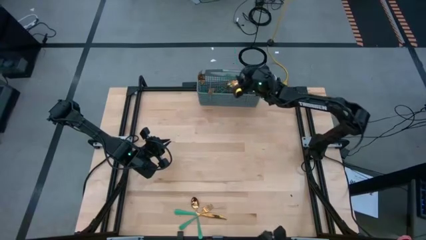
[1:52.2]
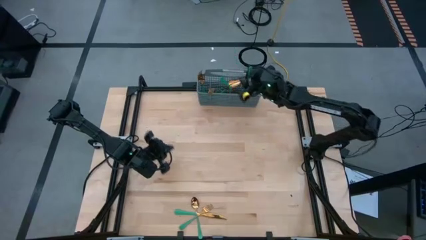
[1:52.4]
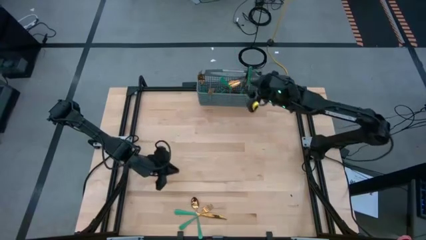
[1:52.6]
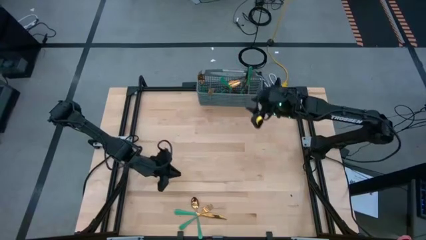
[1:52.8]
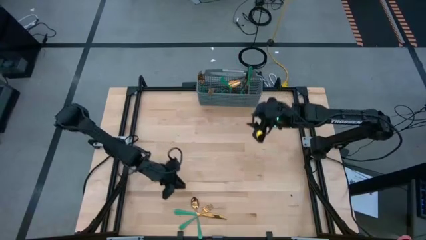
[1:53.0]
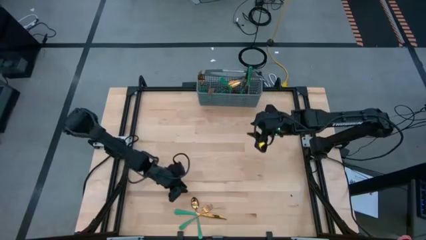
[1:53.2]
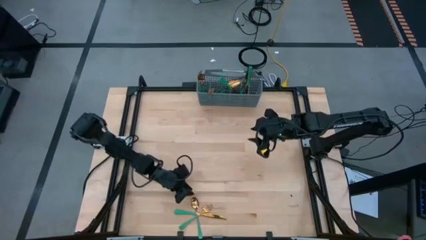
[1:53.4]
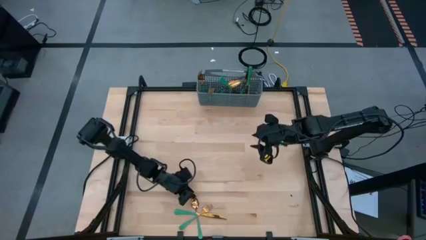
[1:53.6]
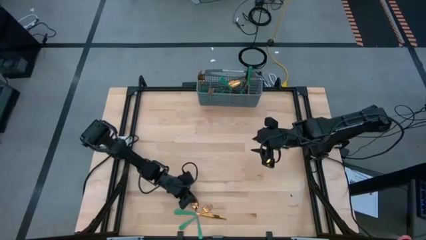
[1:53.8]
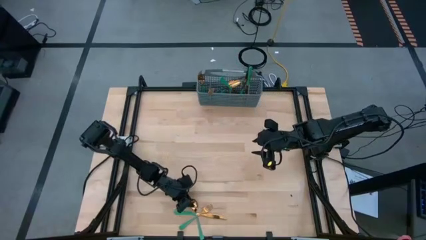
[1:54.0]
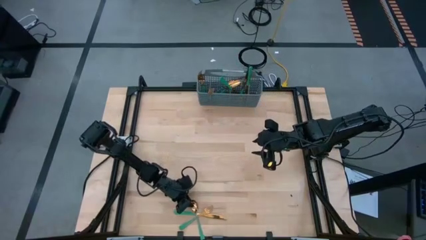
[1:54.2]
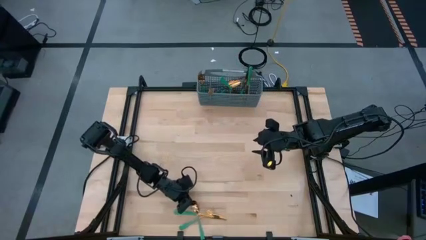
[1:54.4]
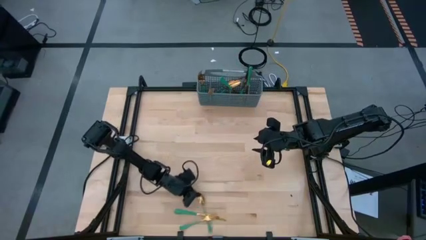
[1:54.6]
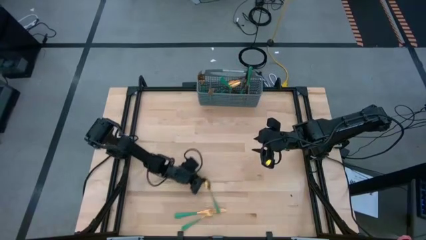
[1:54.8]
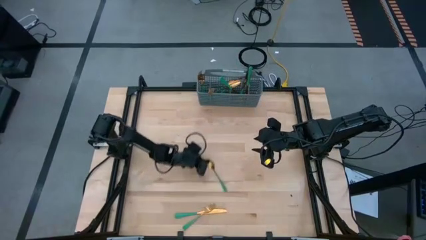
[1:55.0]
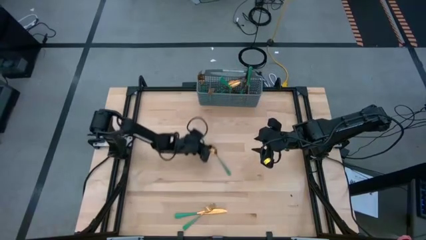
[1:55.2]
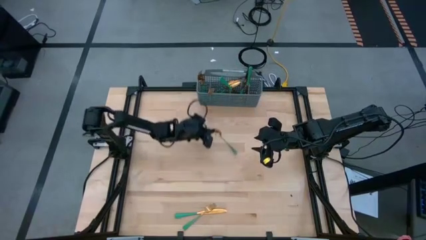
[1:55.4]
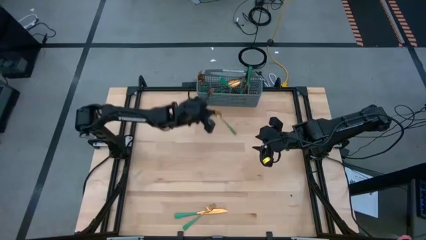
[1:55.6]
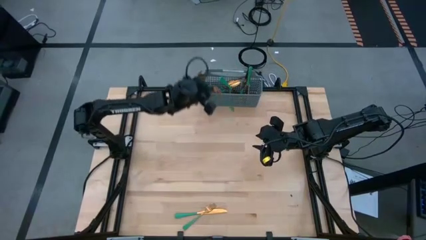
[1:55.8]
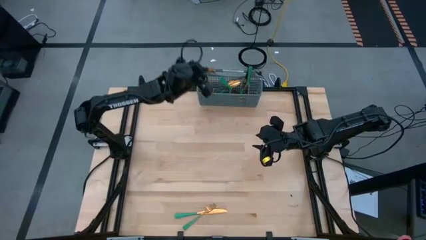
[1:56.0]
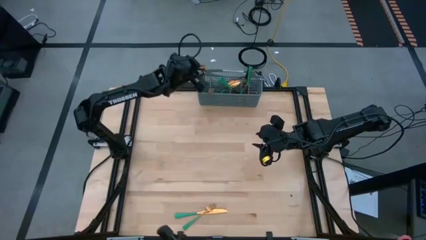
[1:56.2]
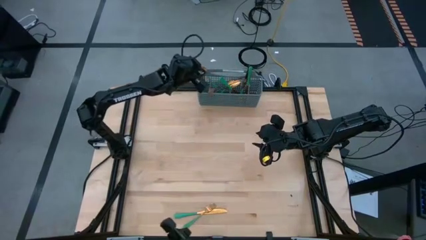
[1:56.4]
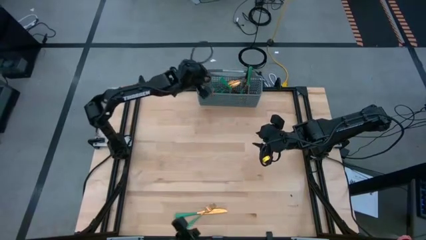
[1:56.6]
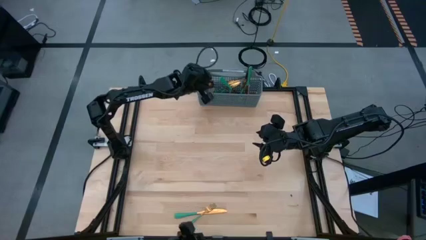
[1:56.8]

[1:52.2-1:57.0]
Task: Sort silverware
Put the green spoon into the gray silverware basket with the other green spoons

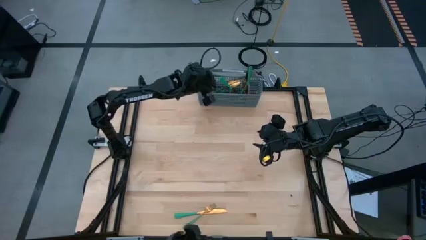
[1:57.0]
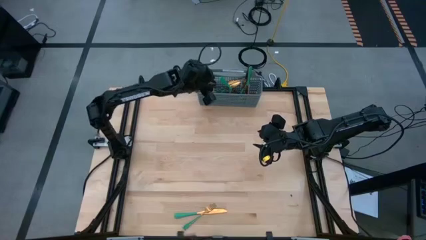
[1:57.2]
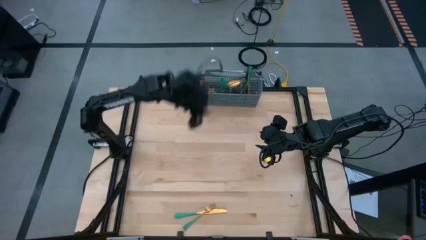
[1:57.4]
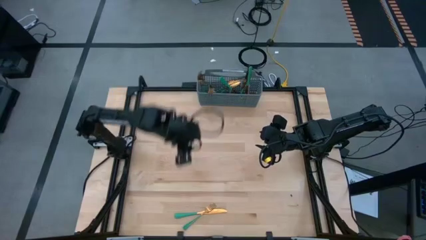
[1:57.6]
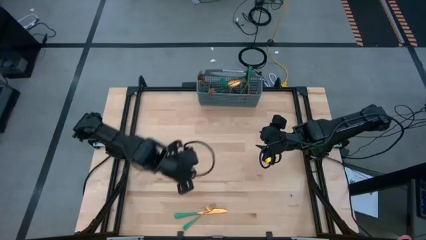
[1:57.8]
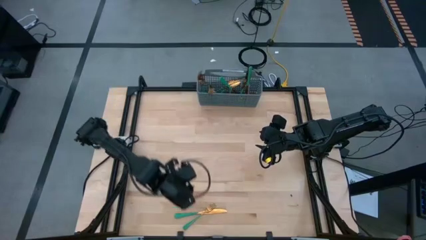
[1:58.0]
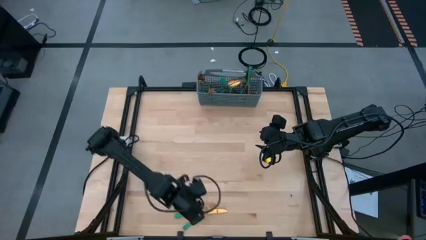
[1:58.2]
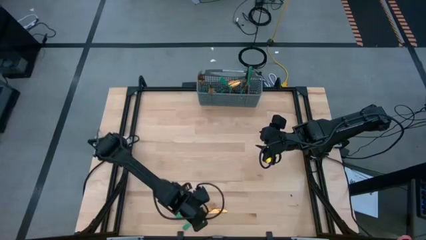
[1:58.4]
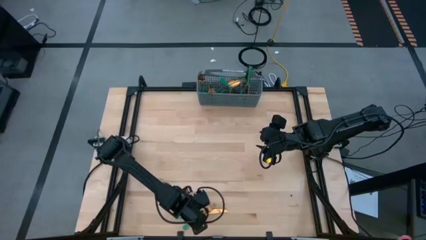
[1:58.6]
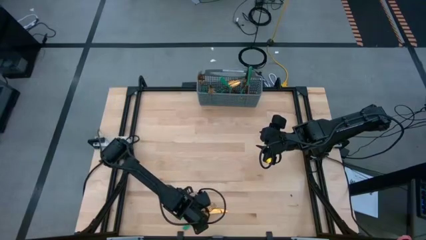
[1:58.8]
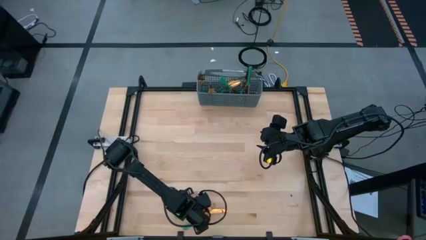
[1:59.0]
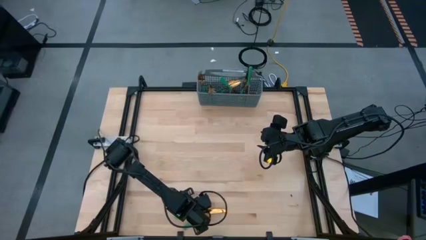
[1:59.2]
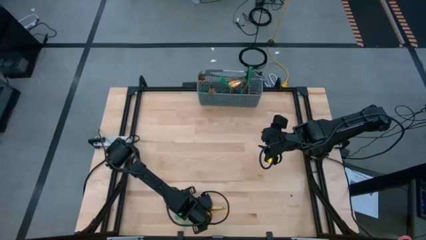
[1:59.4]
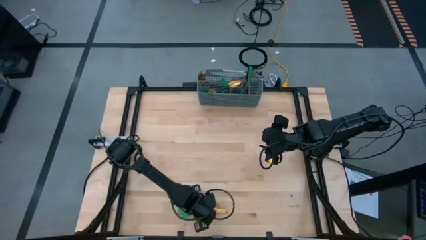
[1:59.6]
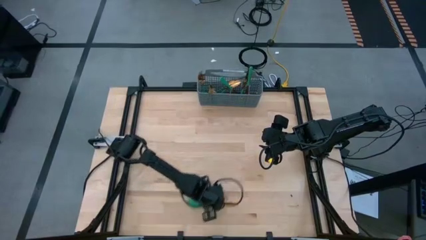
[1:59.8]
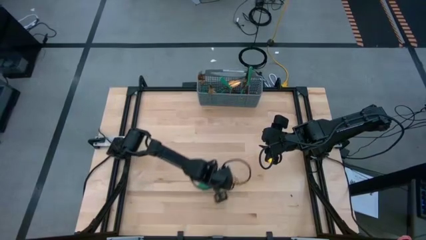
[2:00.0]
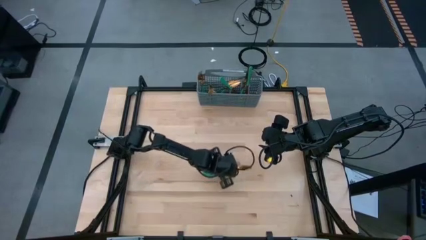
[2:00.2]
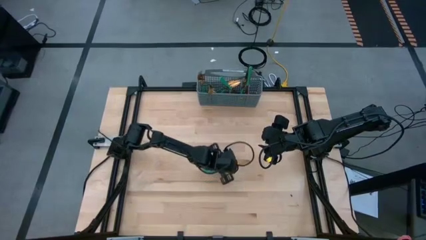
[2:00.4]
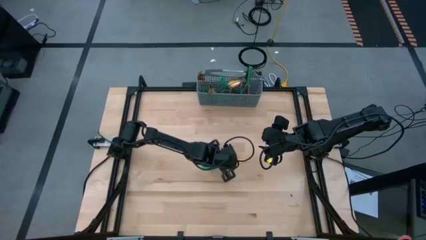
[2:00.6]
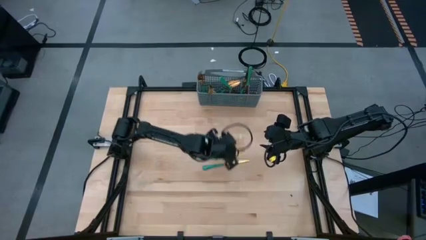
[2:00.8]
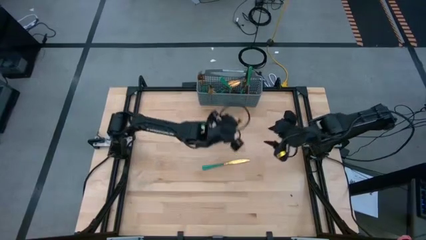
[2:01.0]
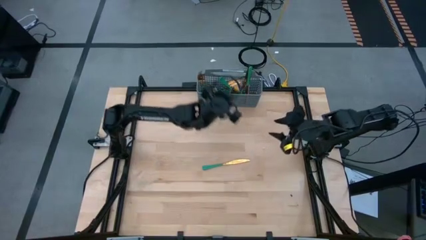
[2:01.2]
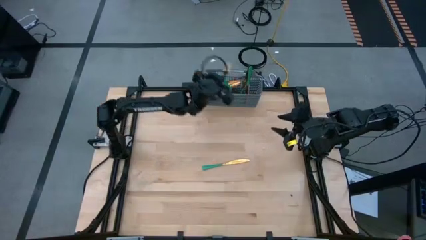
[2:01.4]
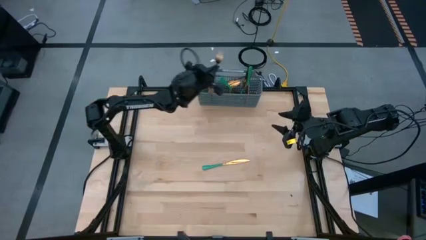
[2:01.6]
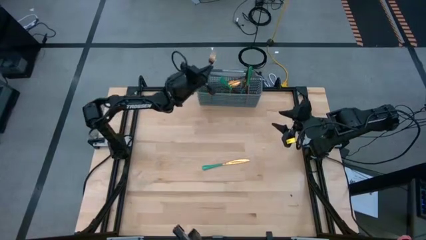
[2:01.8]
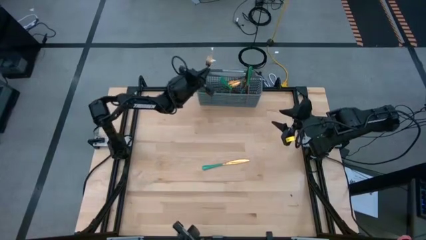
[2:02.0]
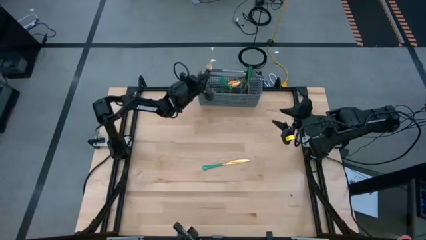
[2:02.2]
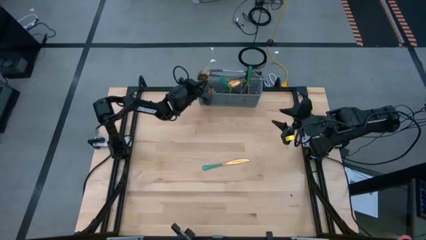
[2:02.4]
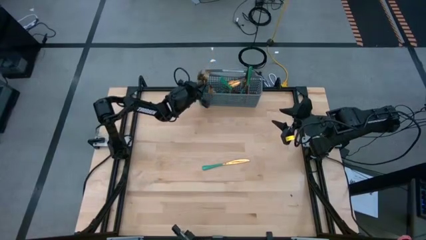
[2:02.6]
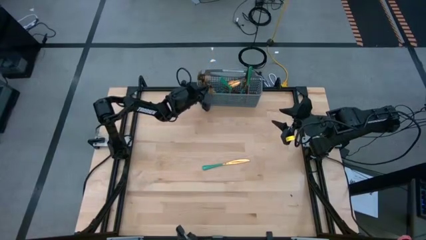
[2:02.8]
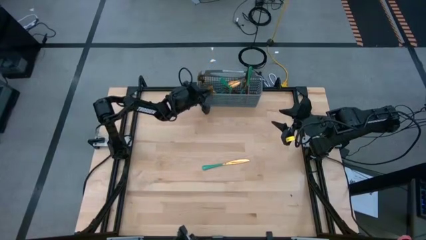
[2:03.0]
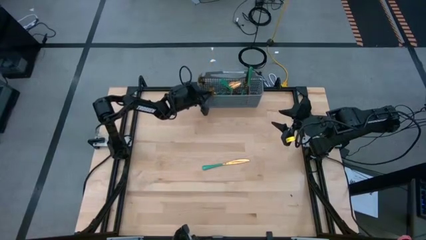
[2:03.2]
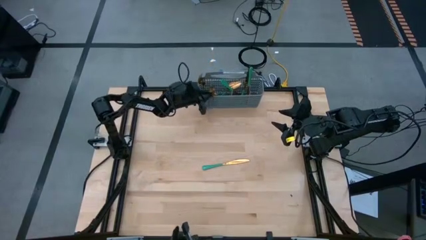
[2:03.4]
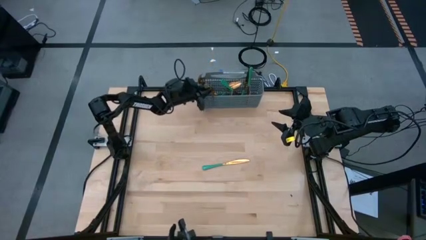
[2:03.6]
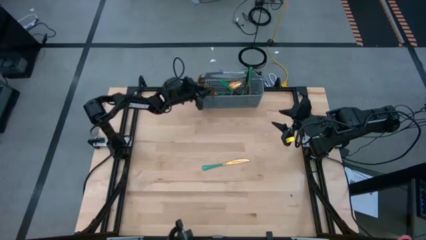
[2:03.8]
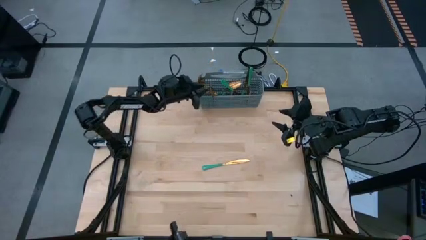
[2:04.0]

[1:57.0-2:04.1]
Put the green fork into the gray silverware basket with the other green forks

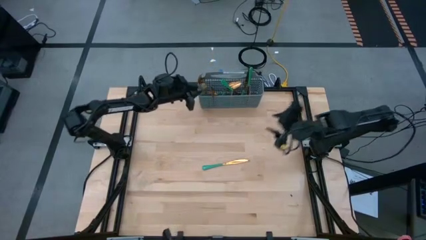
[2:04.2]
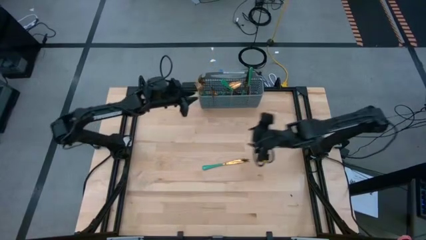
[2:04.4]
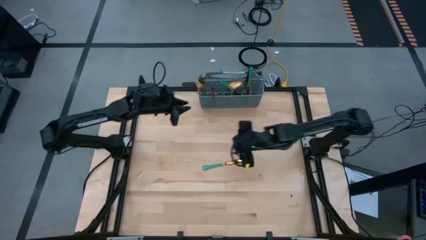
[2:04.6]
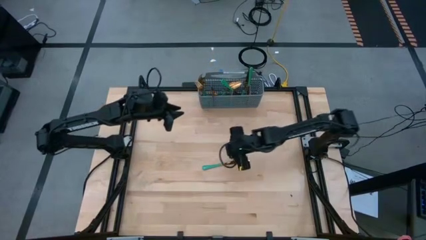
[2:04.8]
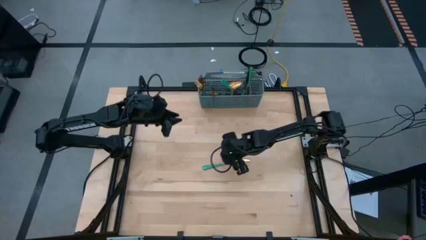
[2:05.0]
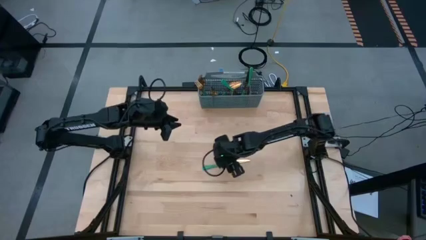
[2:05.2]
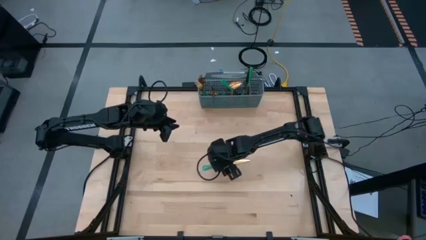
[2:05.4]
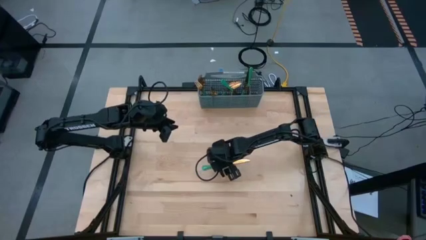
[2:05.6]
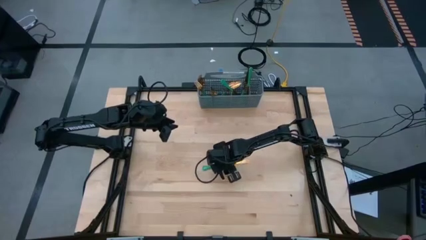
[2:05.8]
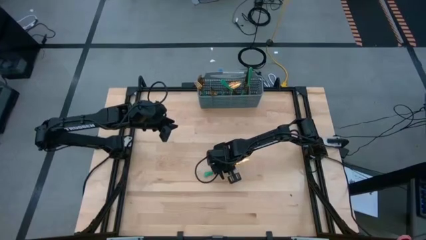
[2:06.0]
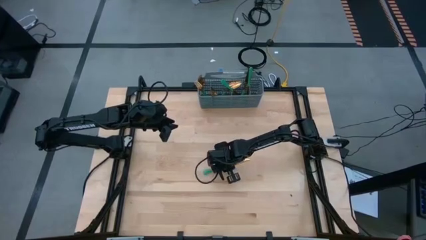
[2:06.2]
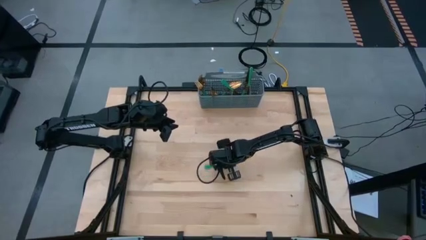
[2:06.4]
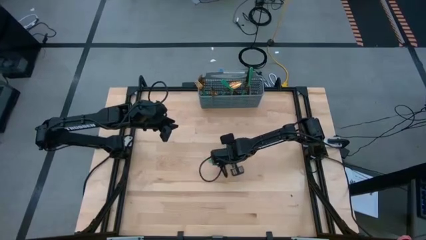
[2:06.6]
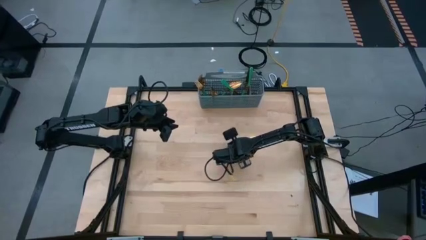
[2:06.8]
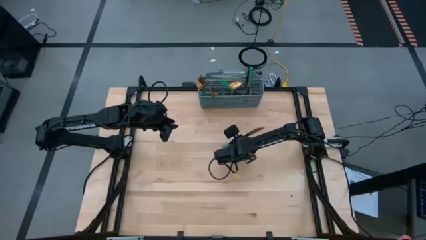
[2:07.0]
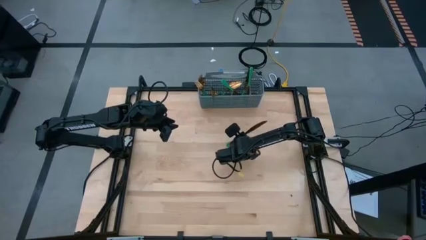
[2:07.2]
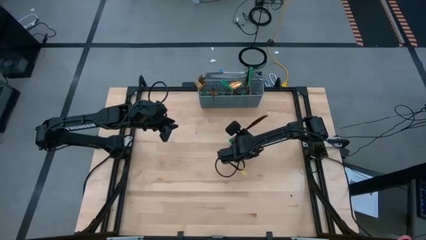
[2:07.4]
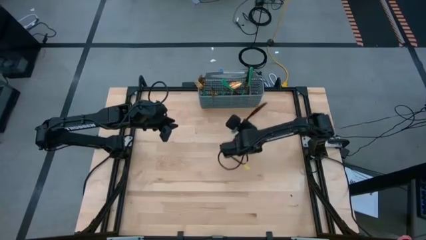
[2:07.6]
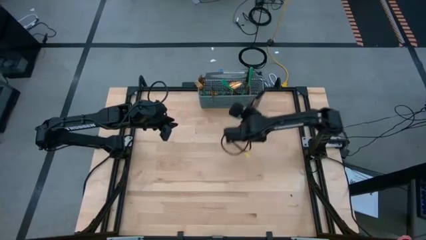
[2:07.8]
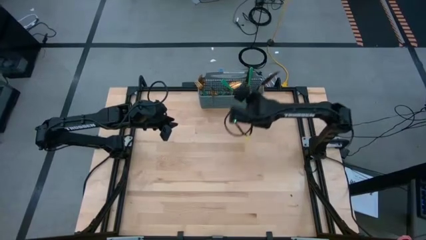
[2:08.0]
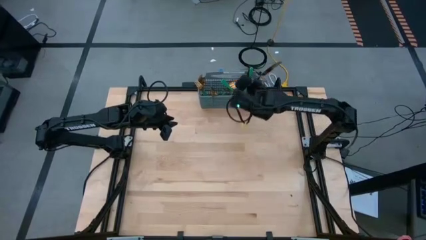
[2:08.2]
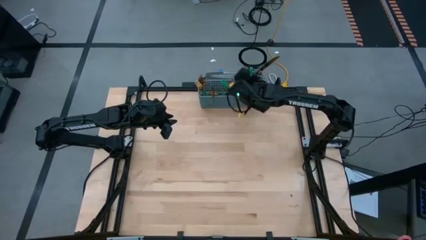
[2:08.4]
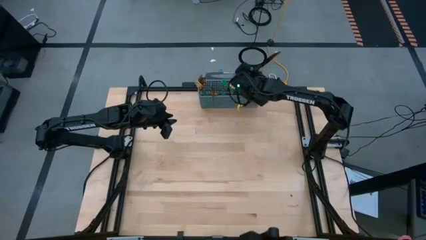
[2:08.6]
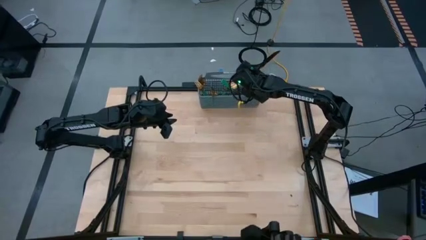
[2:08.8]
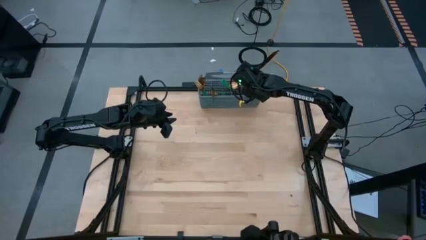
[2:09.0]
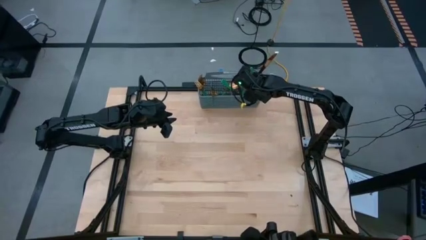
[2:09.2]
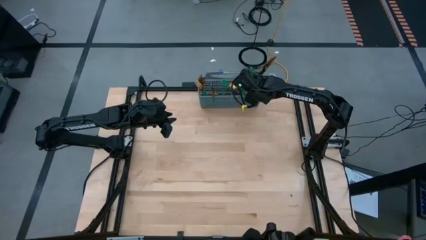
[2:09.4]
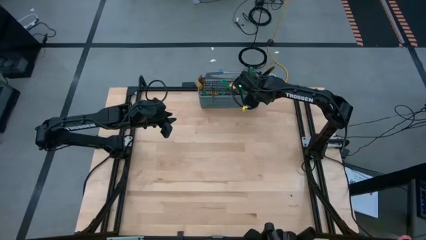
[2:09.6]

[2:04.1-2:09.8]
Put the green knife into the gray silverware basket with the other knives
